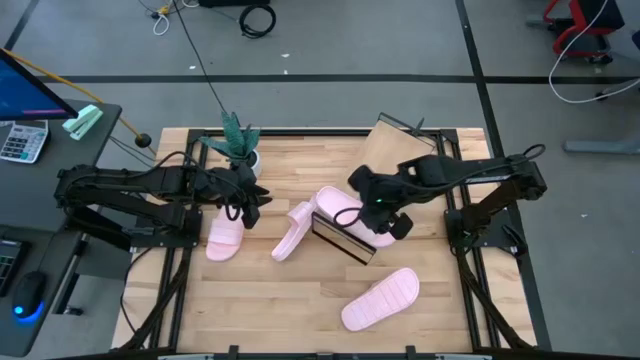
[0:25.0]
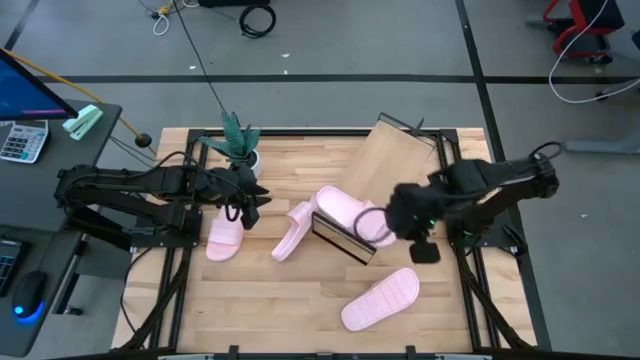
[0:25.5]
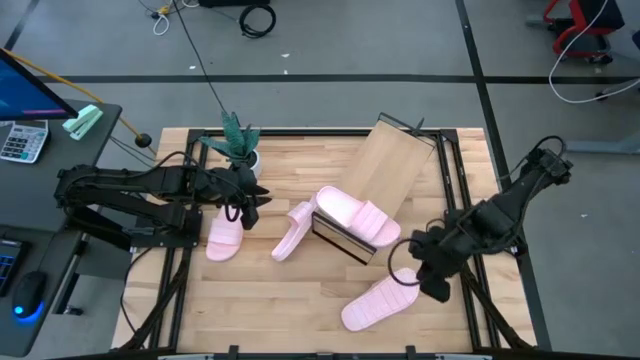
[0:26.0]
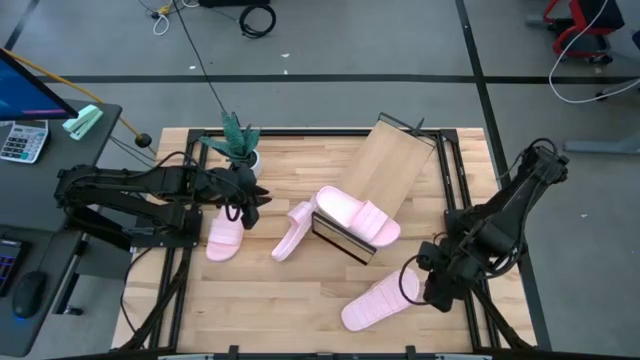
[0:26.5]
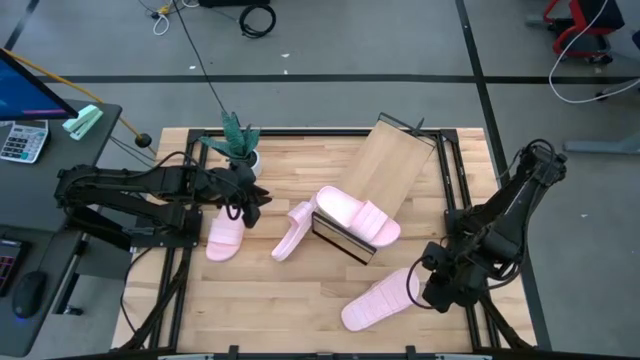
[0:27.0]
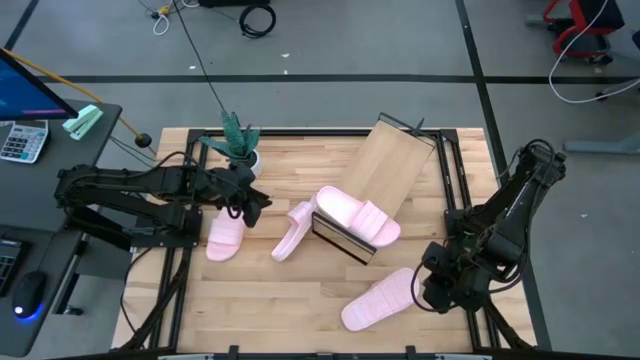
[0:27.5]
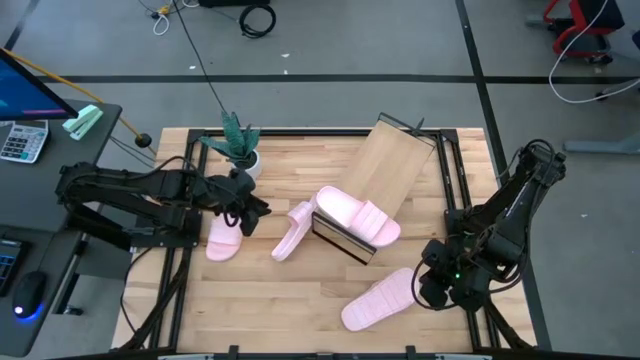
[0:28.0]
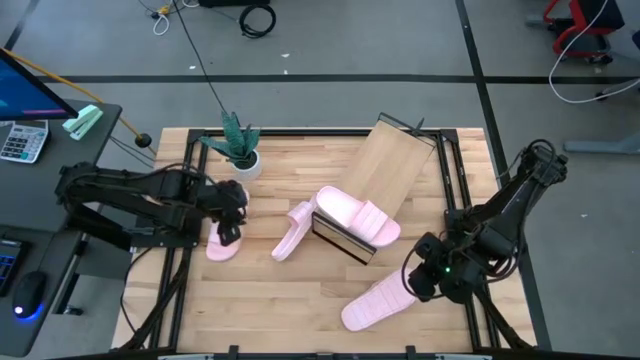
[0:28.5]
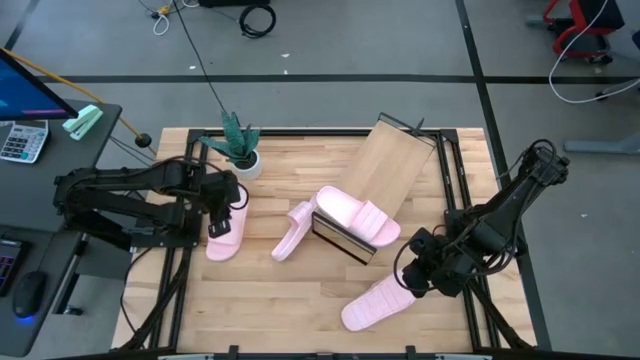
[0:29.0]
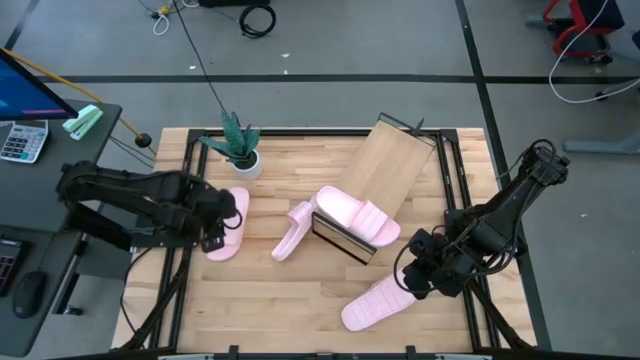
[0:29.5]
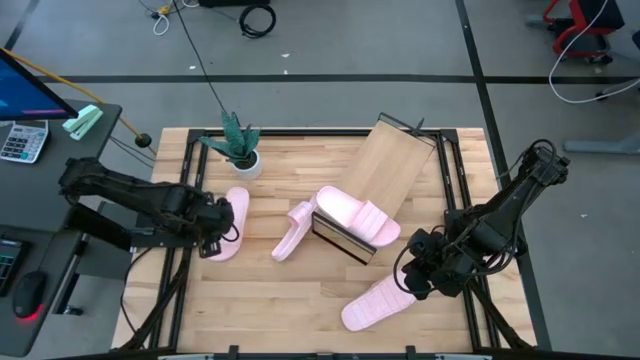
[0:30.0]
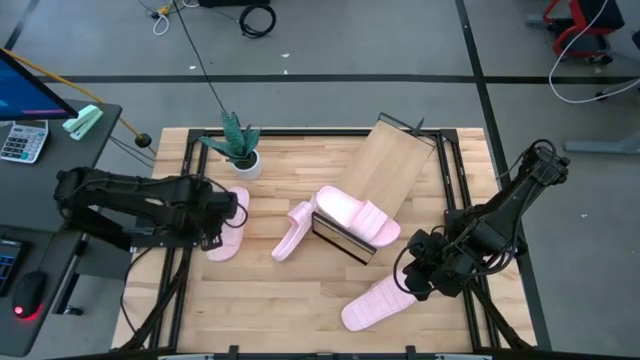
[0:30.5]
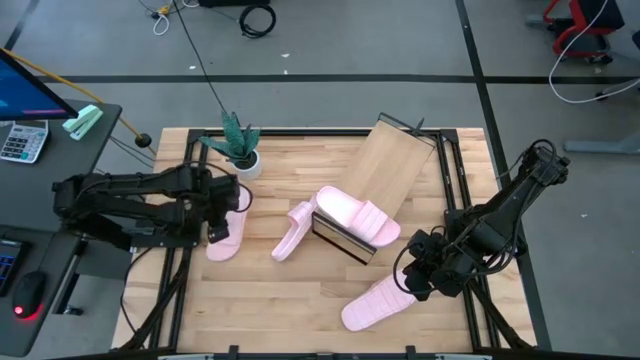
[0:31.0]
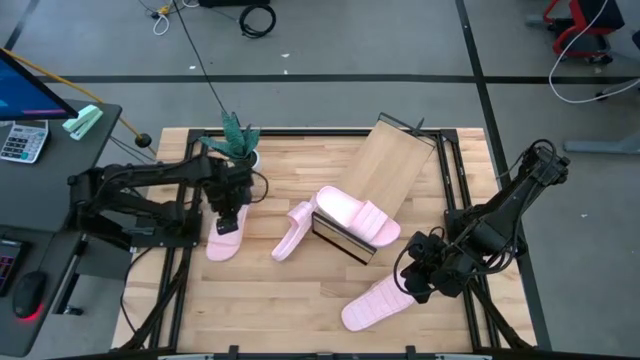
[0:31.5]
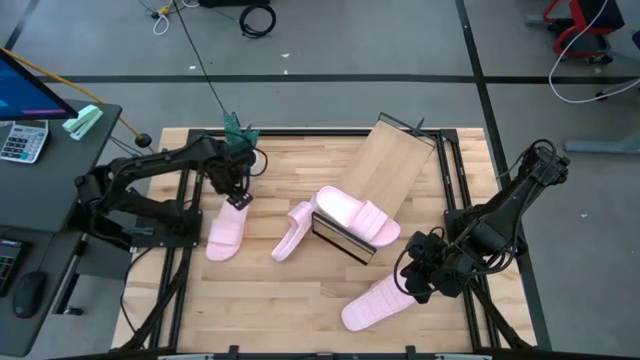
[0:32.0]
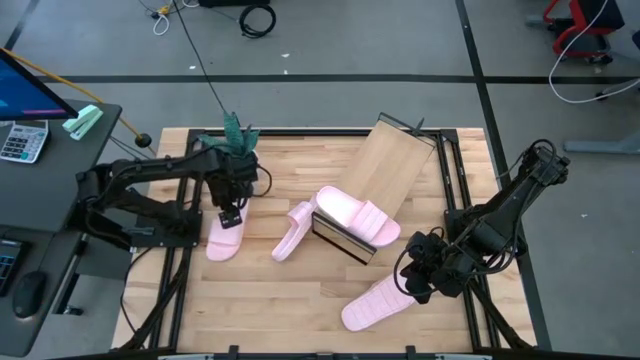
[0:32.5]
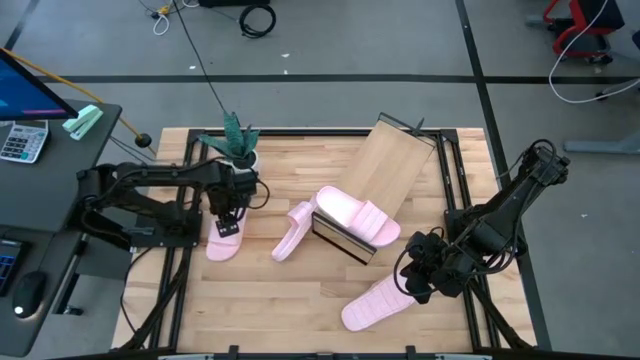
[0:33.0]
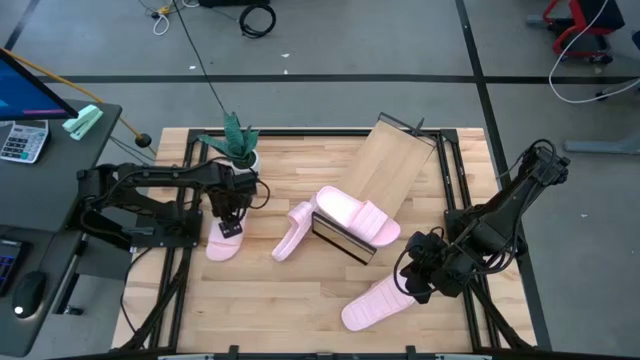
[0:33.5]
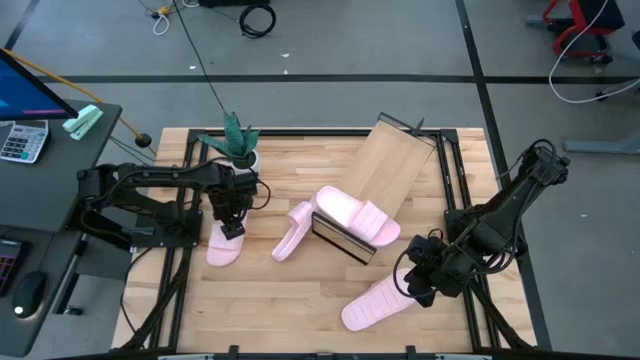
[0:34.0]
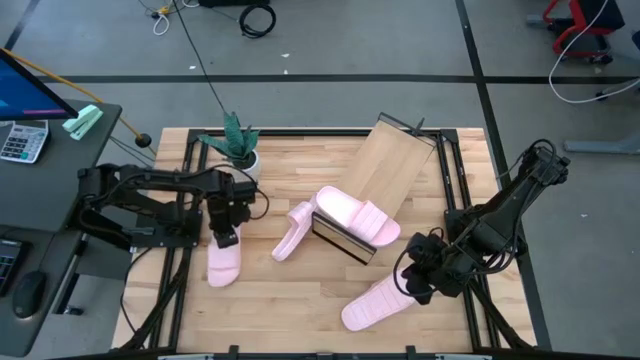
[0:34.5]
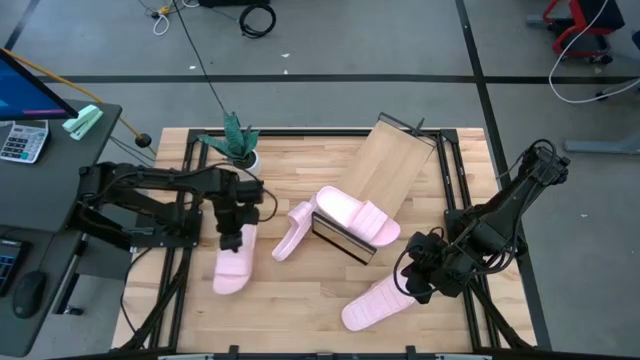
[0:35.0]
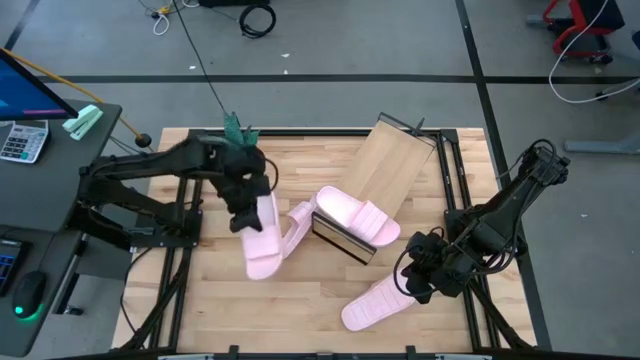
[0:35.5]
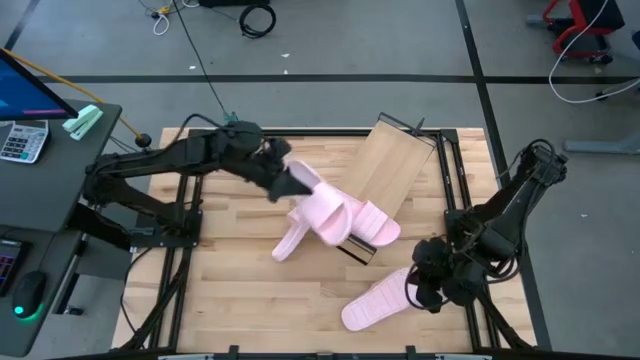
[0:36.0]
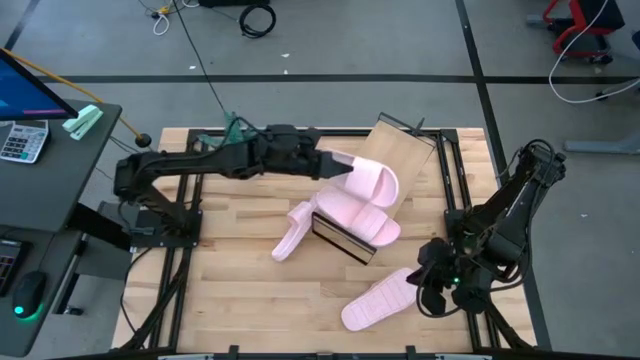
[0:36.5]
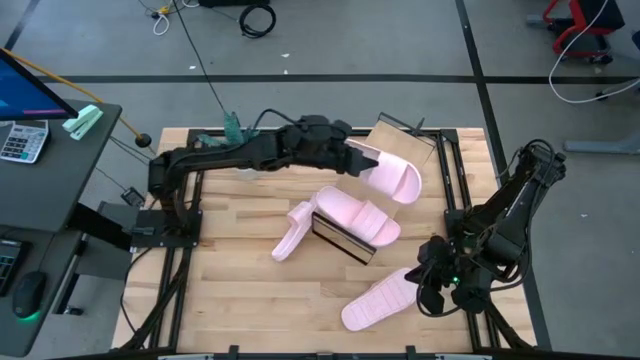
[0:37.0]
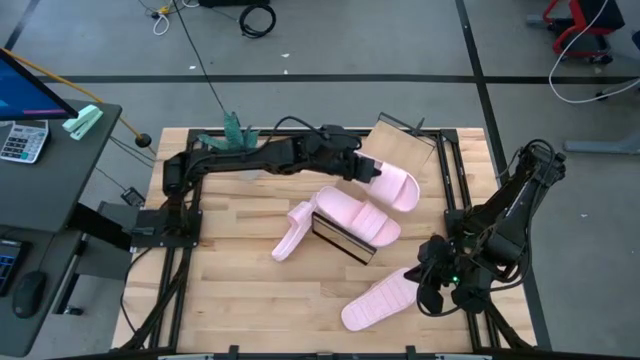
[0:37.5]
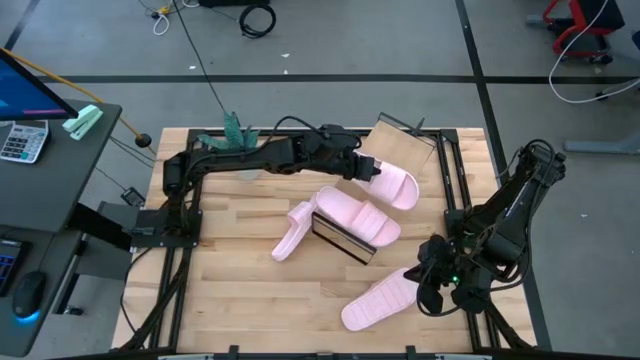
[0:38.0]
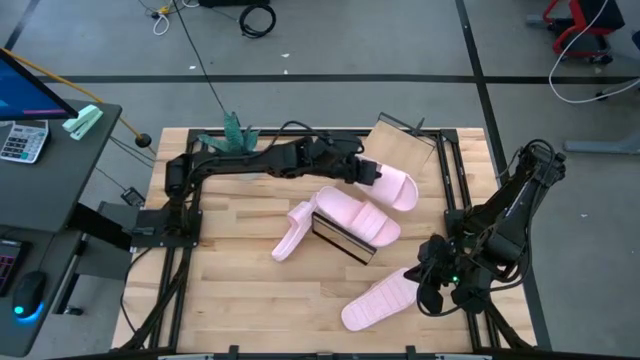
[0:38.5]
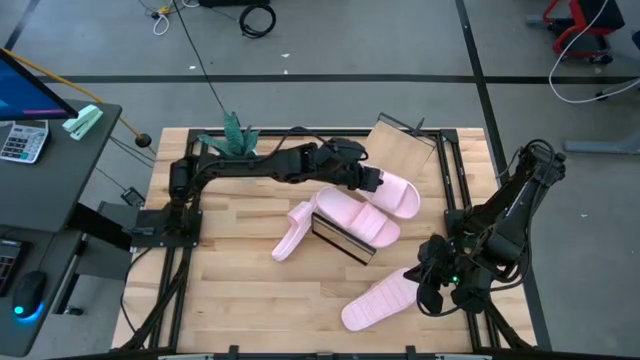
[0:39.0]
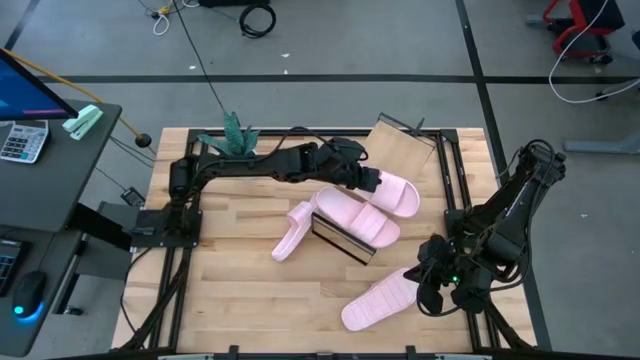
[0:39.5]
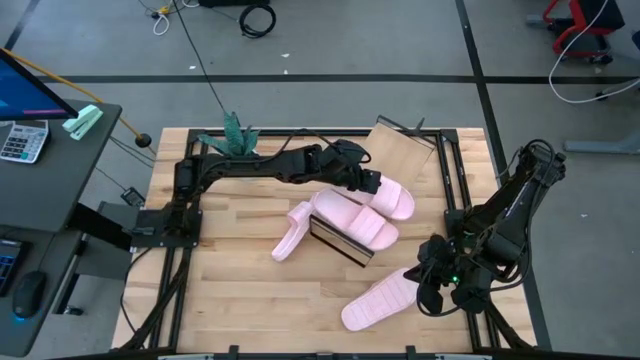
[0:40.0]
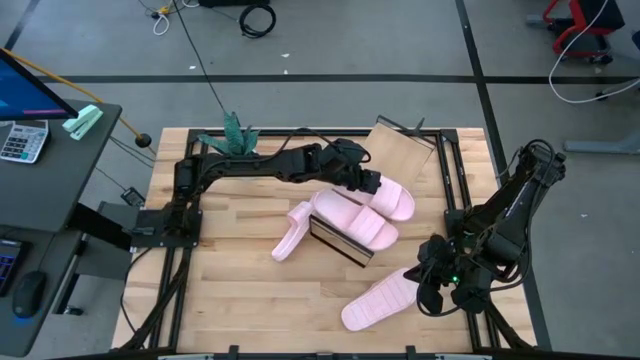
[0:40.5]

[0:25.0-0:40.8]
Task: Pick and place slides into the shelf
Put the pink slide on the shelf

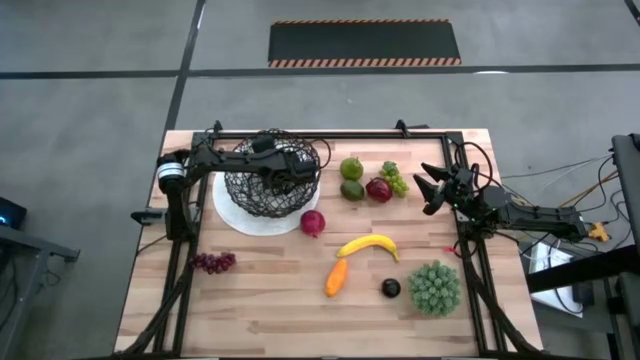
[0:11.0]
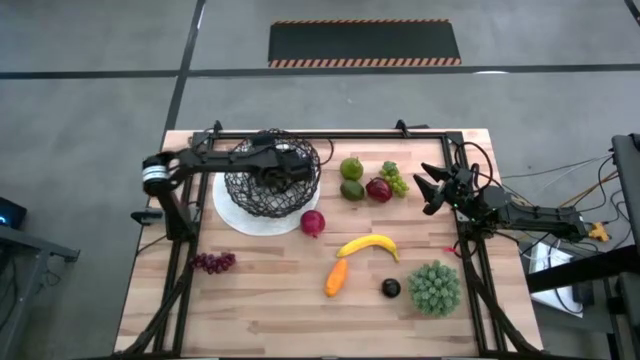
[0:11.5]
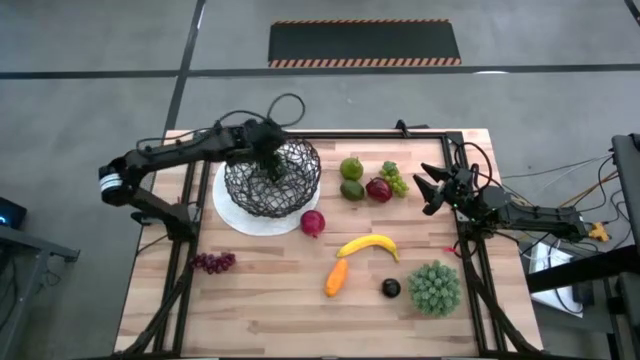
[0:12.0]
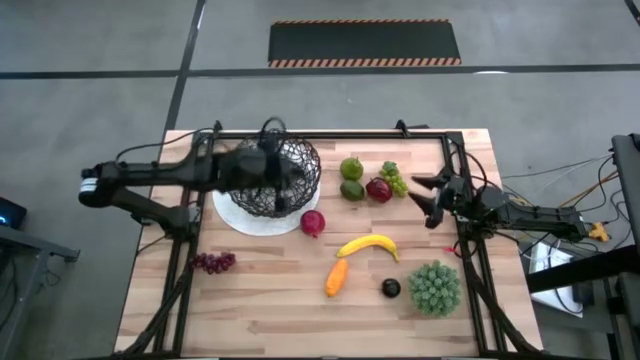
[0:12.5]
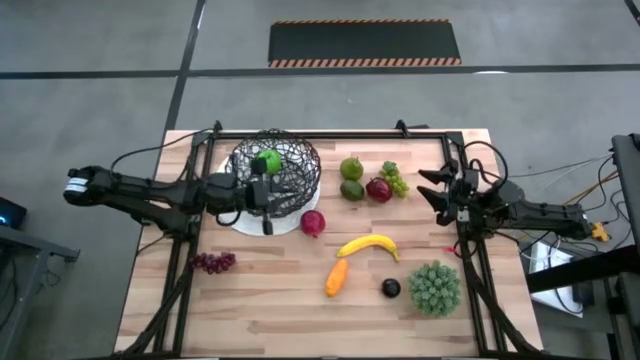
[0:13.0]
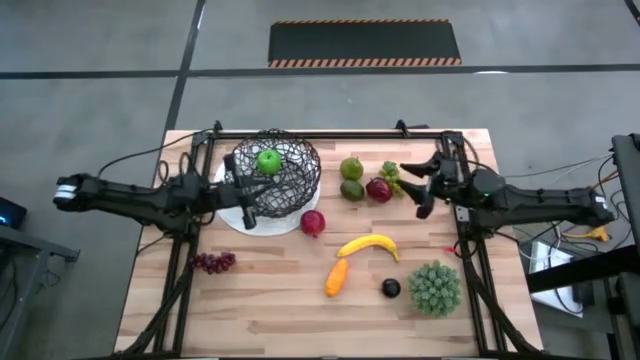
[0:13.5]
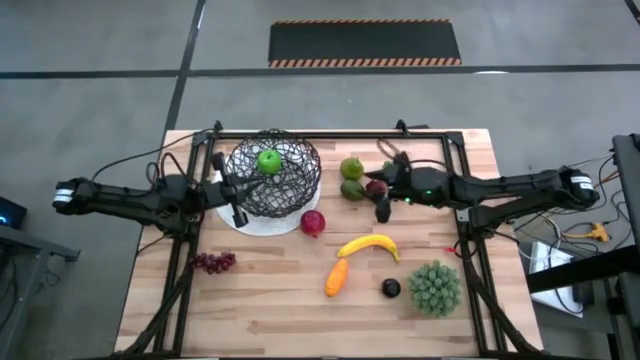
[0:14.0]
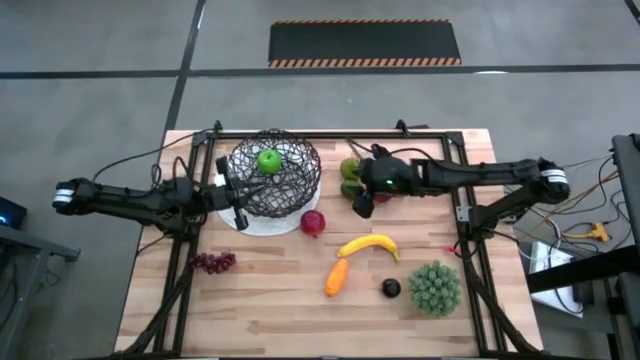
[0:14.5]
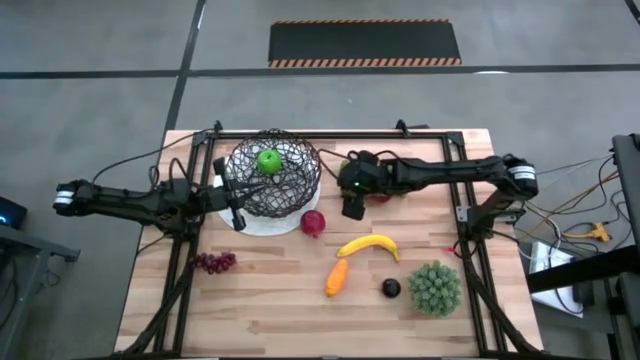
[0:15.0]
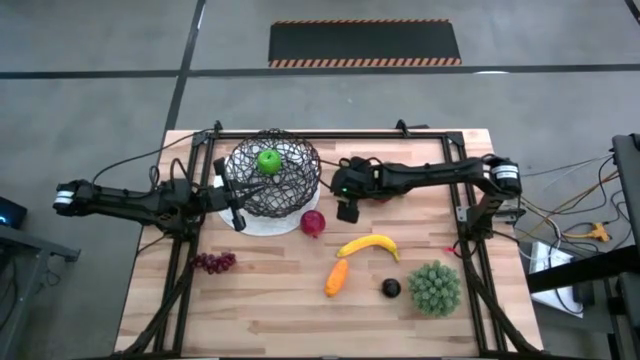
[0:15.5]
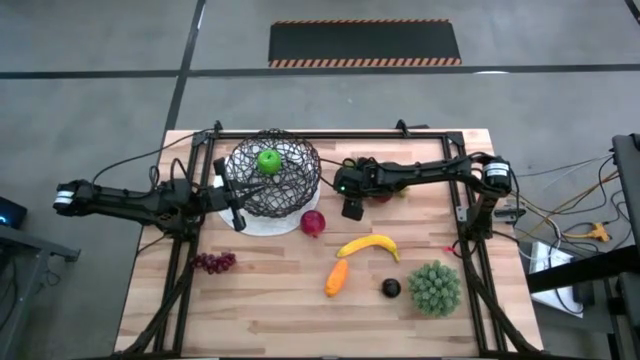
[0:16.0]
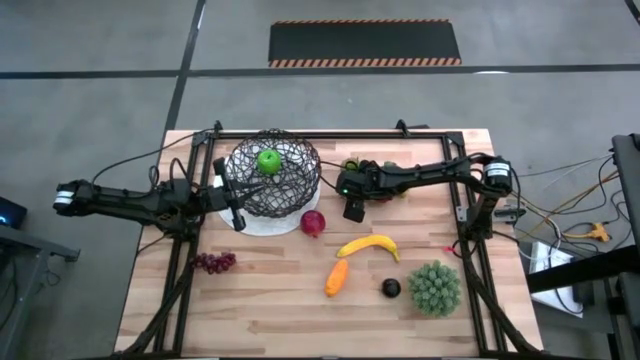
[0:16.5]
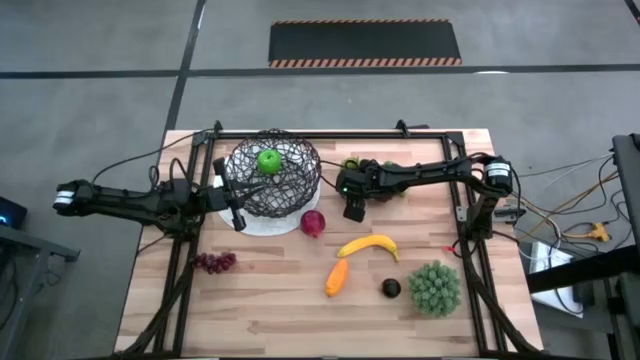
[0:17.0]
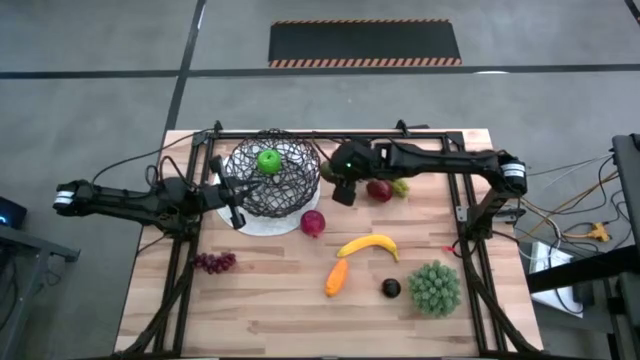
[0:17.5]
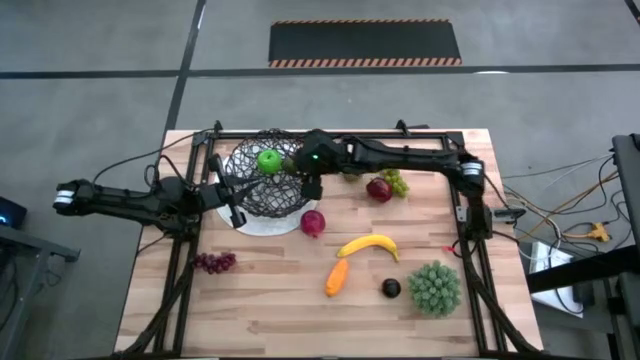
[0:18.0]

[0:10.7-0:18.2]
Task: Build produce basket
Put the green lemon into the woven basket
